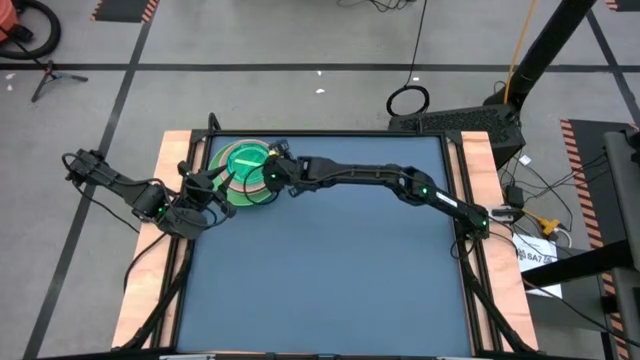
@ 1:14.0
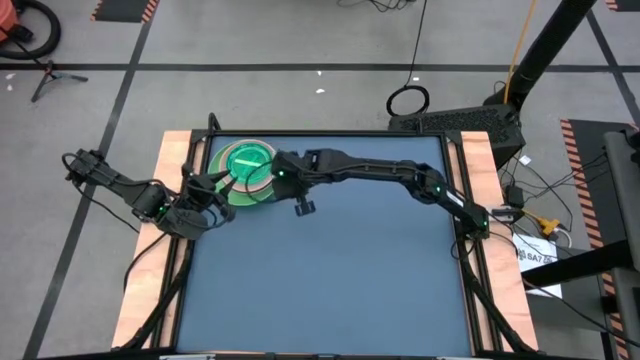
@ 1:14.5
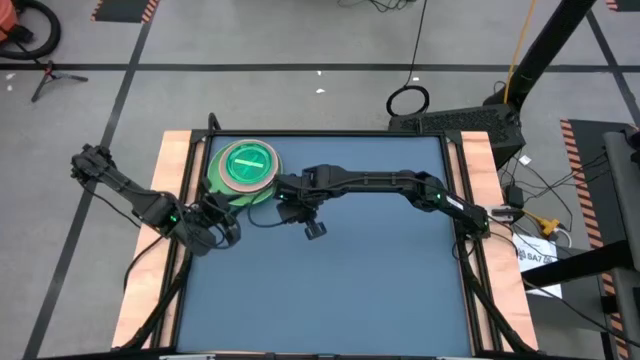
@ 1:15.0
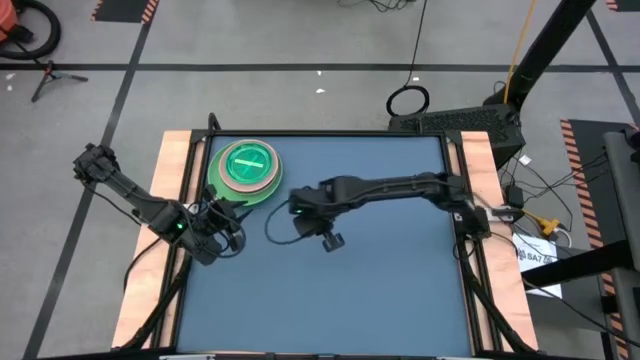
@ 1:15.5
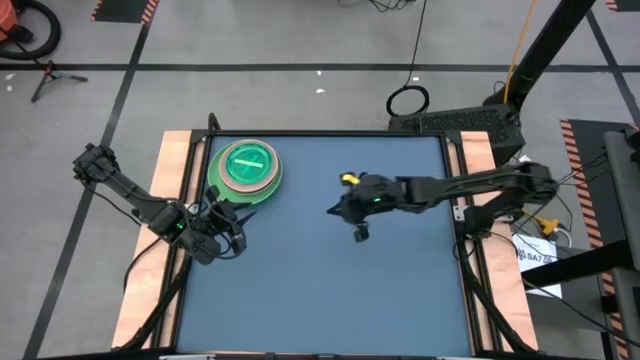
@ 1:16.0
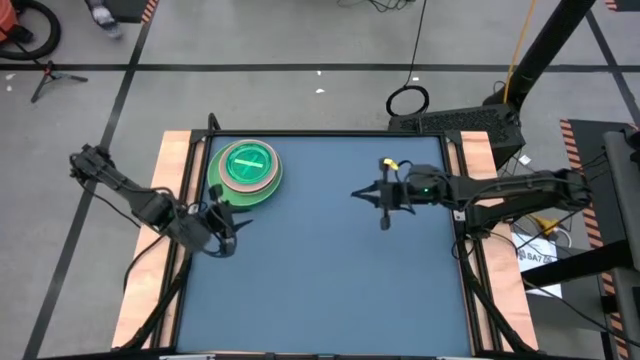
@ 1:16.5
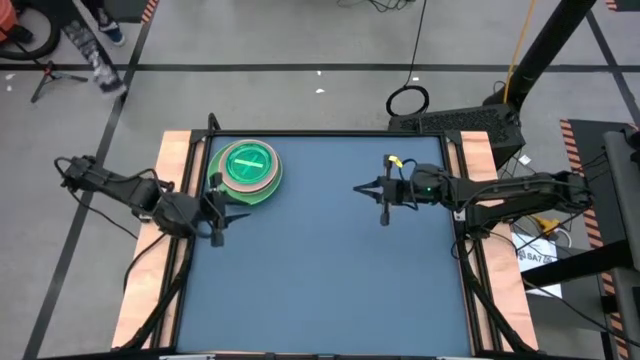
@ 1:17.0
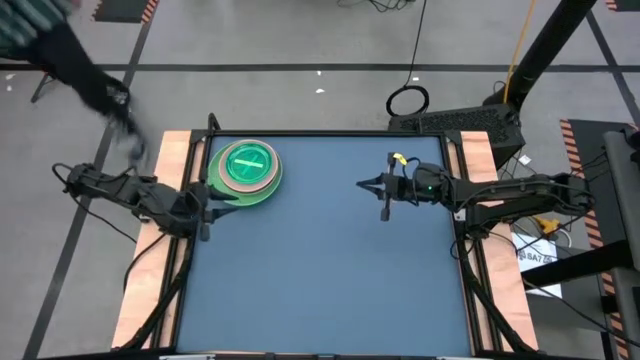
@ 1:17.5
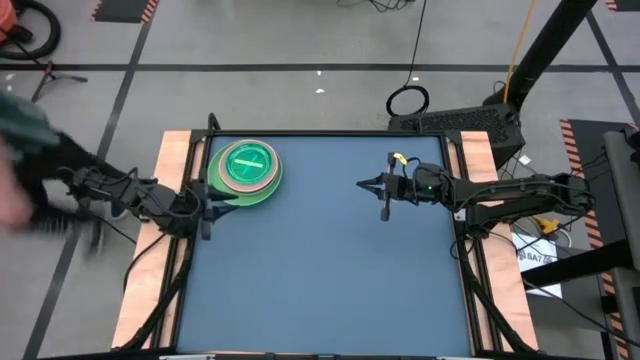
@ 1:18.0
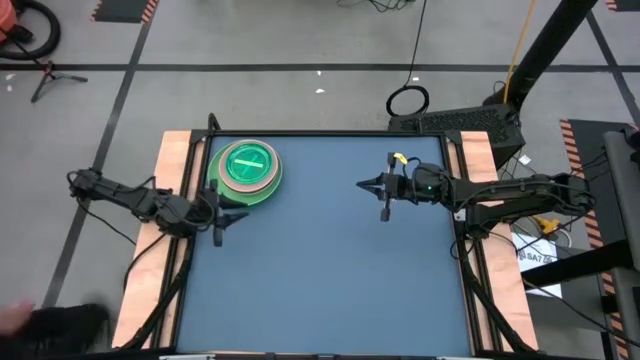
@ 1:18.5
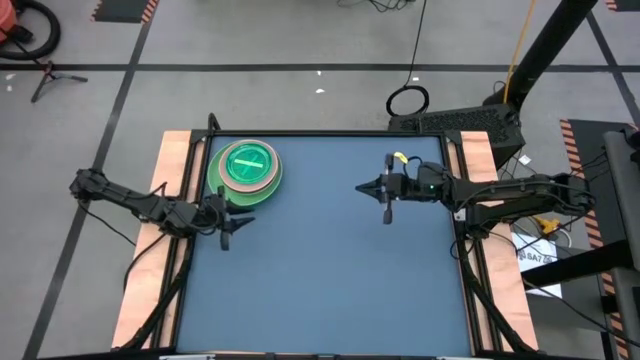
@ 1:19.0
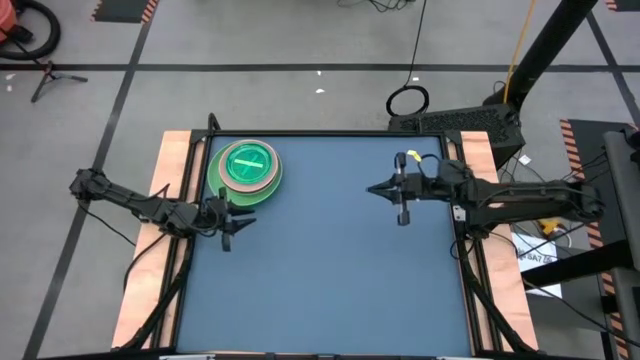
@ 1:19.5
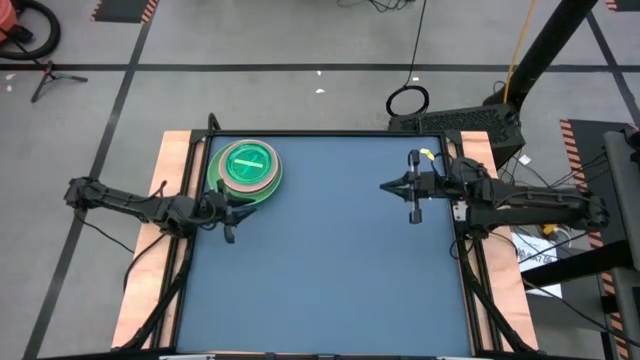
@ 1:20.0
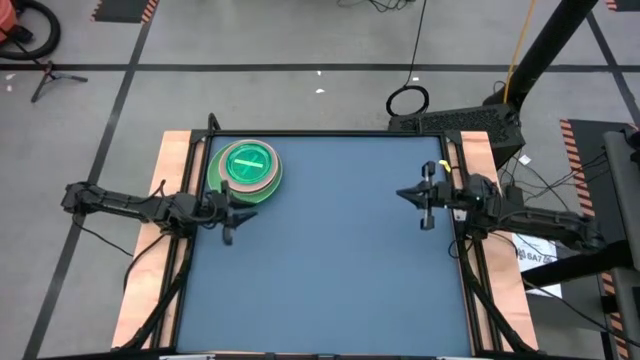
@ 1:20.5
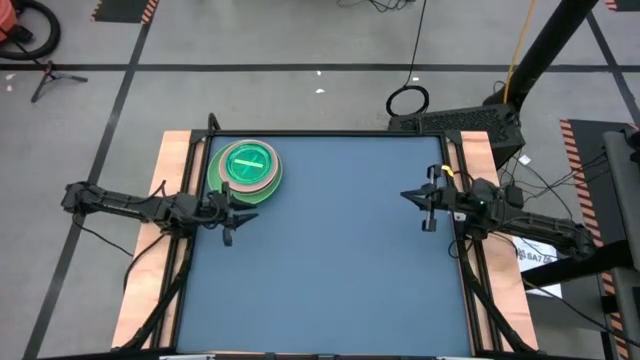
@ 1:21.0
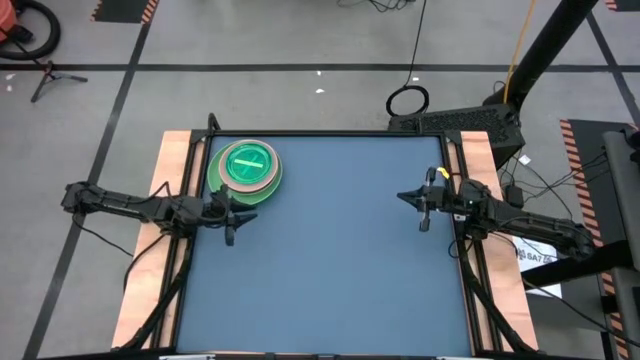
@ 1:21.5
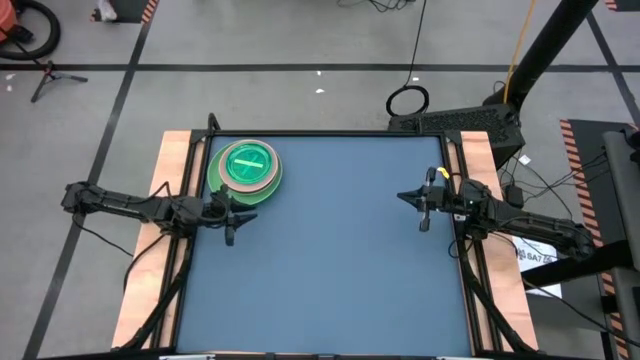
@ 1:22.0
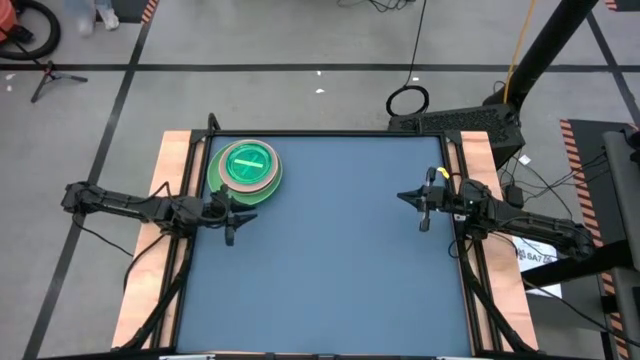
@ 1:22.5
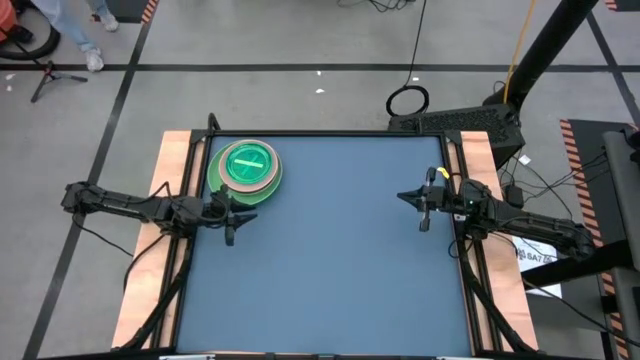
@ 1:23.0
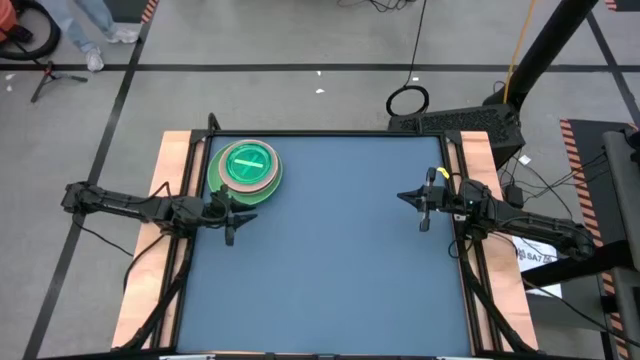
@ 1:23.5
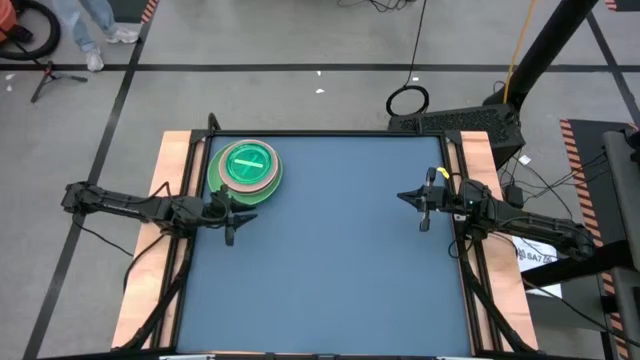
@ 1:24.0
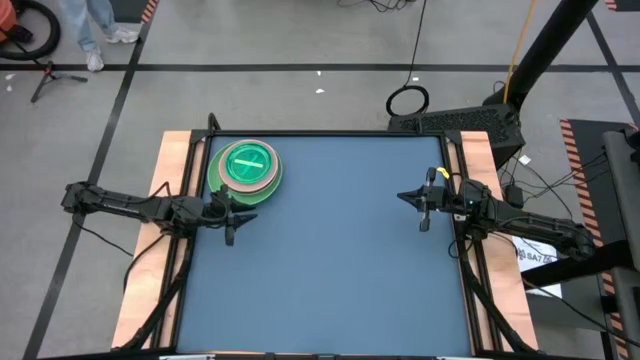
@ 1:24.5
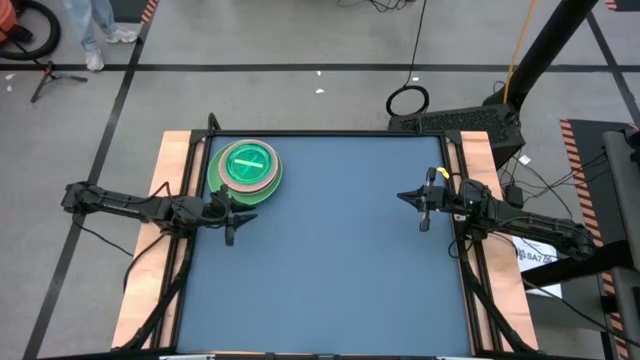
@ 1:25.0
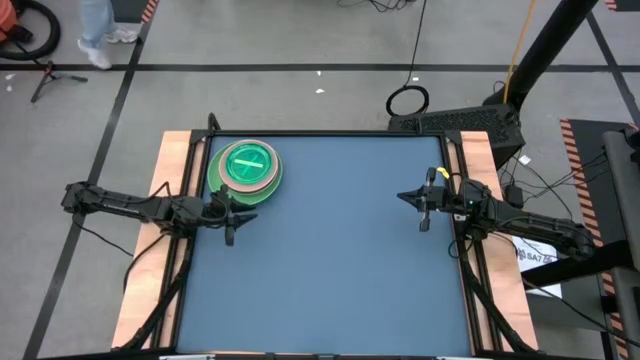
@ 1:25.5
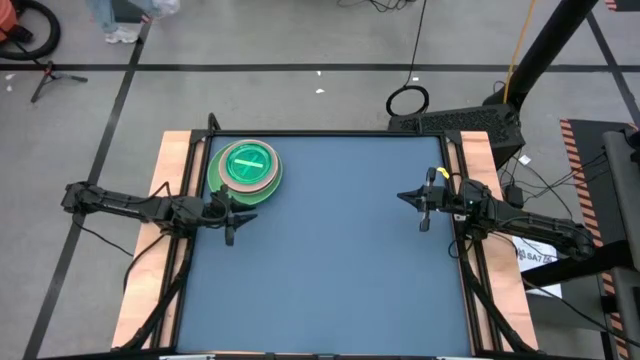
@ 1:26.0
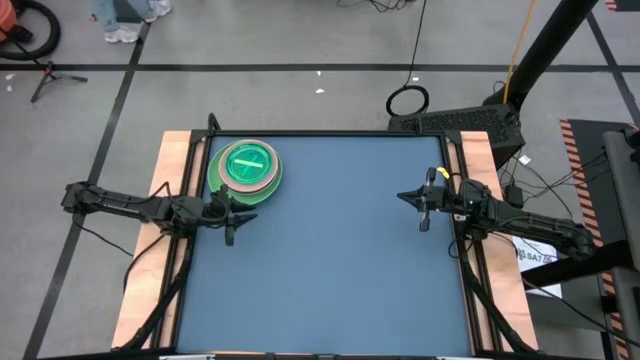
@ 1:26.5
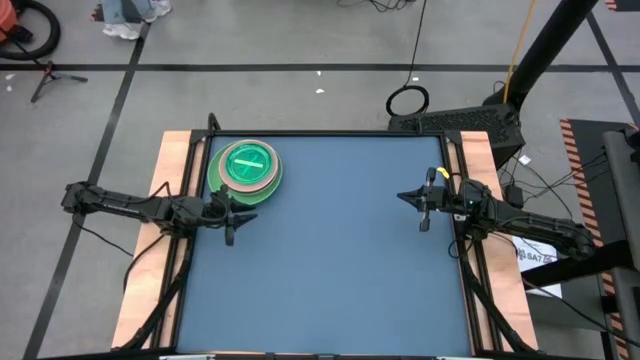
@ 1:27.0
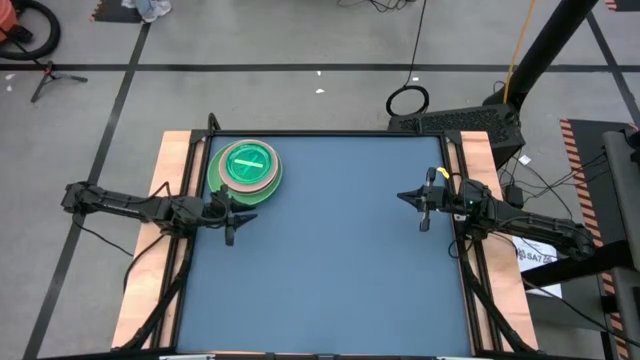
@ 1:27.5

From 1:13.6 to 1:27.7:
Task: Stack plastic plates
Return to Home Position

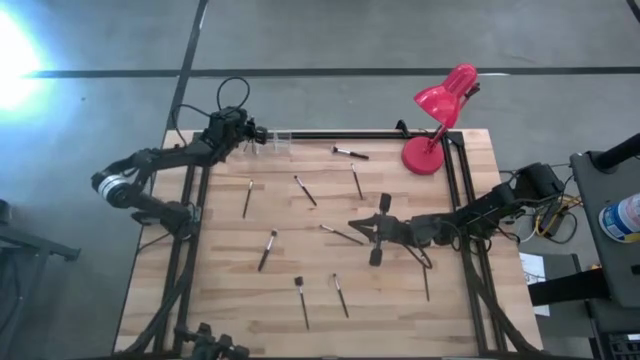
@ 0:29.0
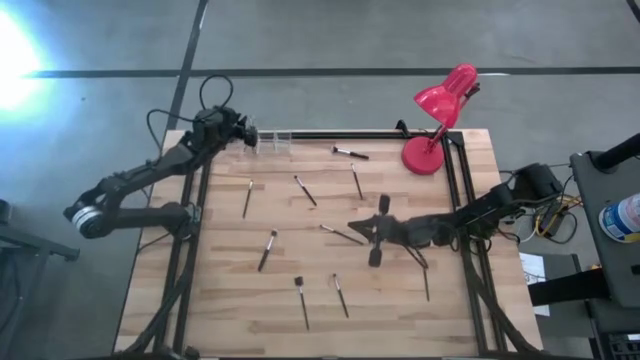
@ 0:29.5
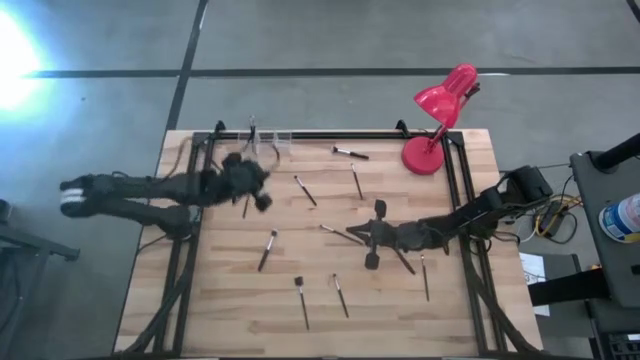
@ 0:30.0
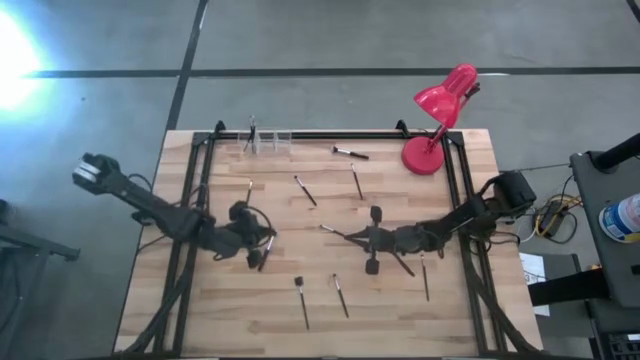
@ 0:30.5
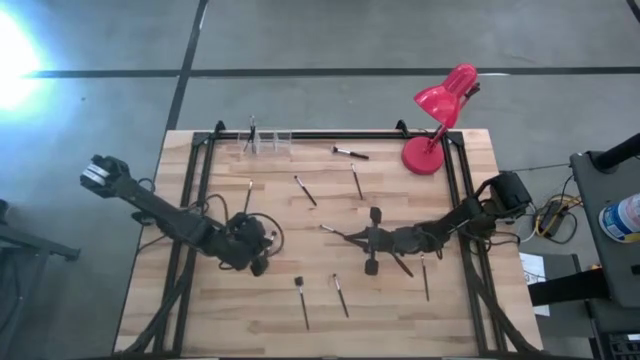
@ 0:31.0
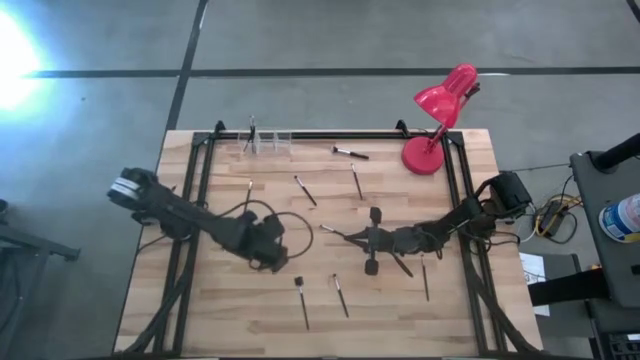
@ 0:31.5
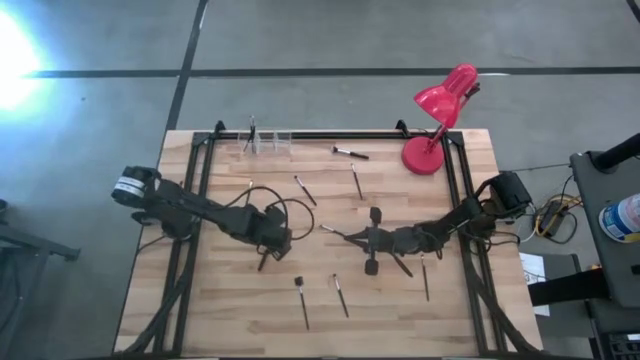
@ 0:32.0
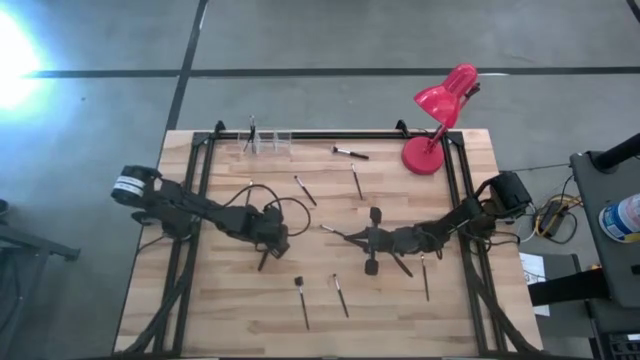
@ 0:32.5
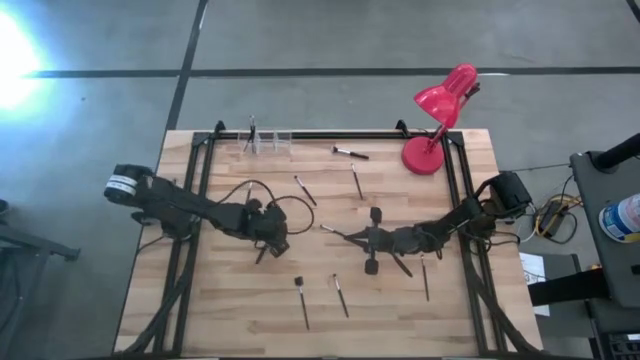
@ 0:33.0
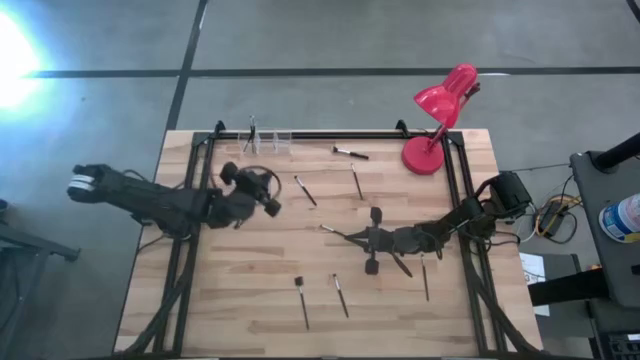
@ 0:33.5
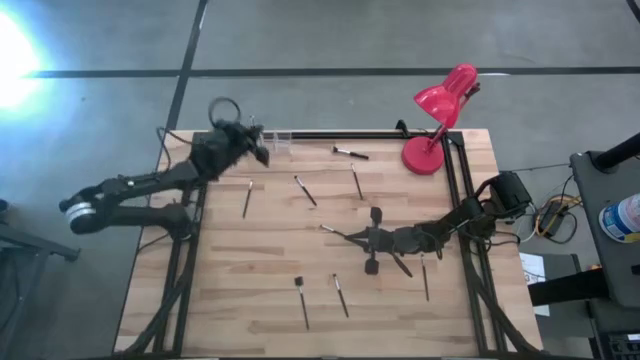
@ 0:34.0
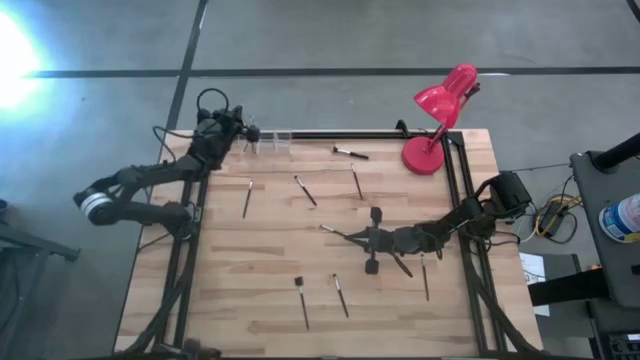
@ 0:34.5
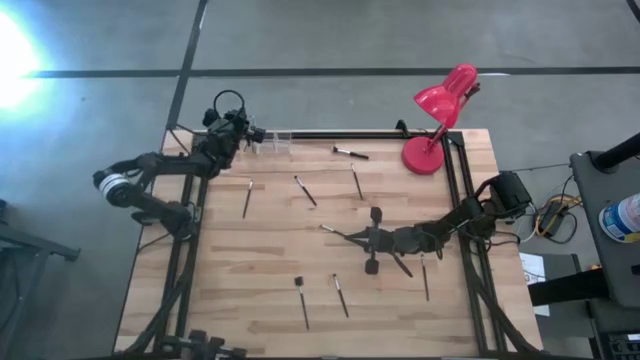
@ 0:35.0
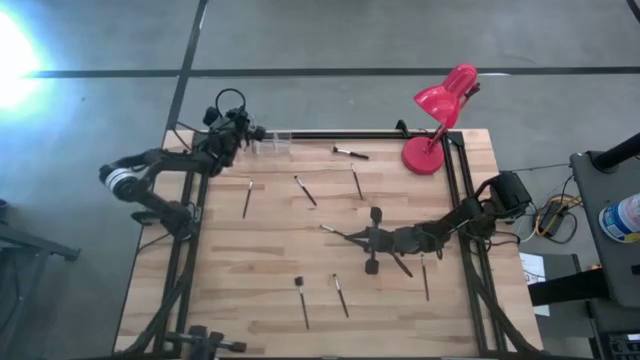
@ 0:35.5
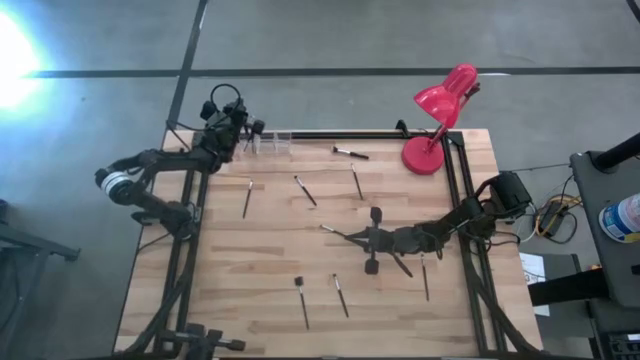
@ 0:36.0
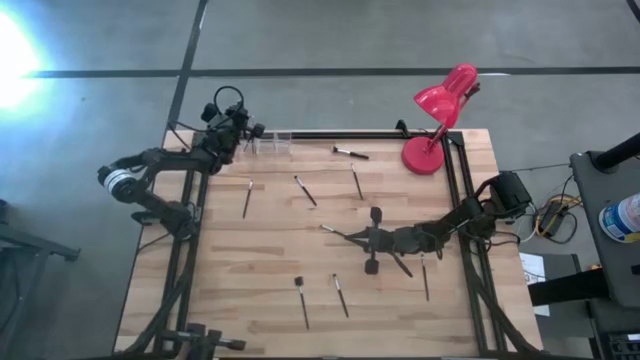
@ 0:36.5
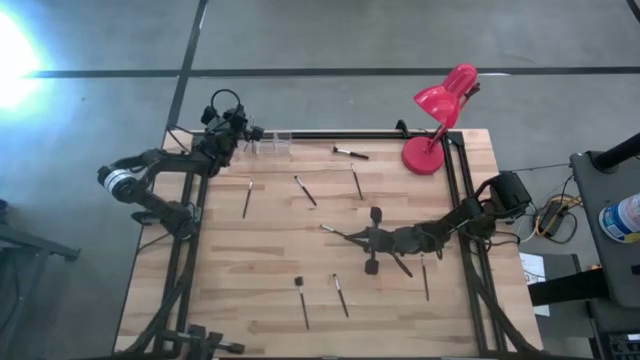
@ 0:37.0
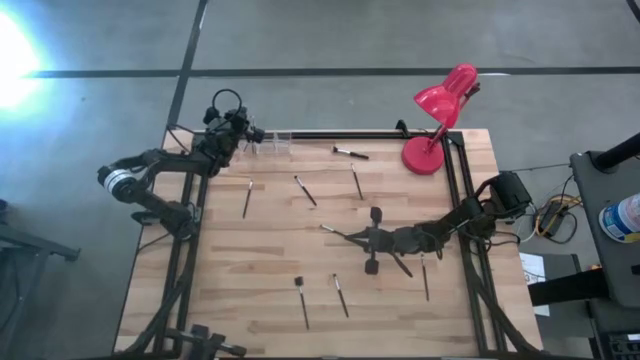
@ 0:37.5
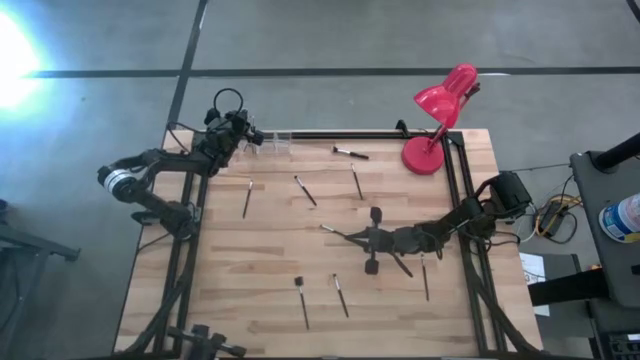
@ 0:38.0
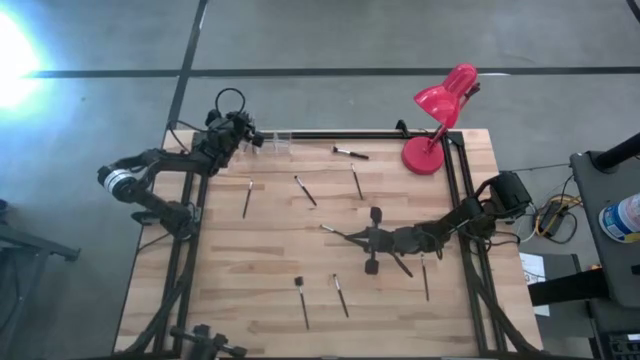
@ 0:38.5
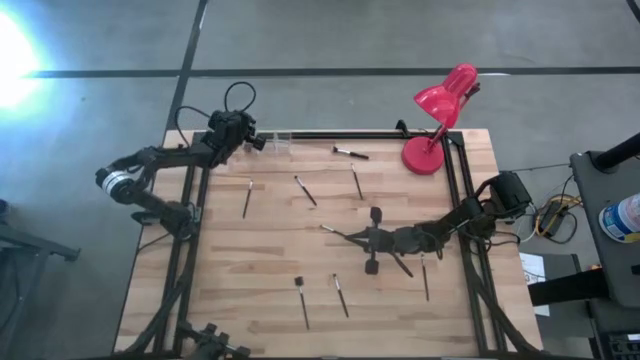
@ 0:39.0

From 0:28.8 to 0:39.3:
Task: Put items in baskets/containers
Put the black powder brush into the transparent organizer
